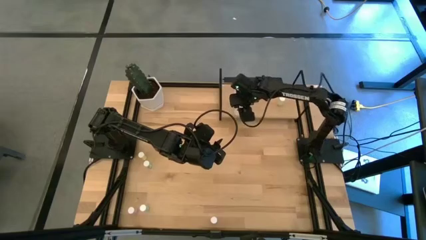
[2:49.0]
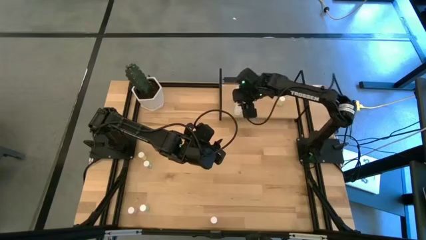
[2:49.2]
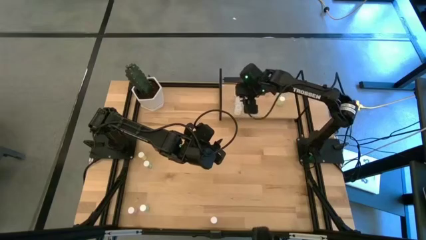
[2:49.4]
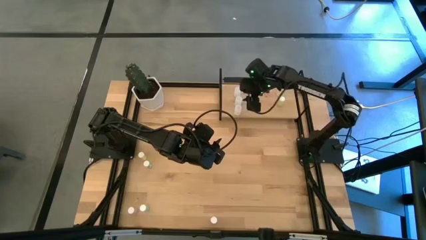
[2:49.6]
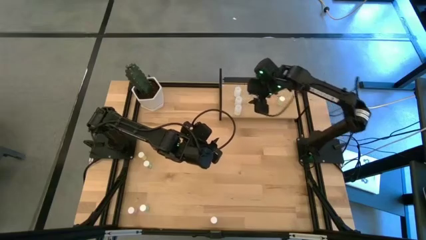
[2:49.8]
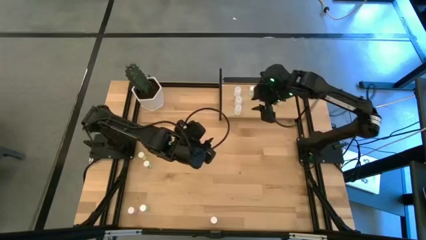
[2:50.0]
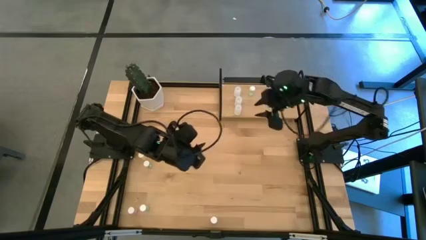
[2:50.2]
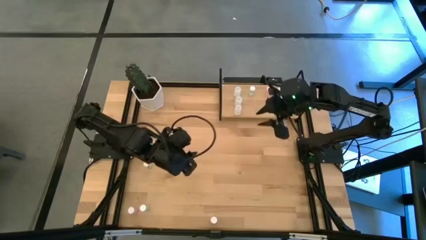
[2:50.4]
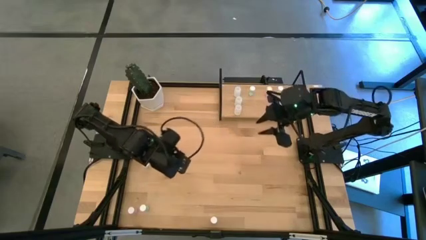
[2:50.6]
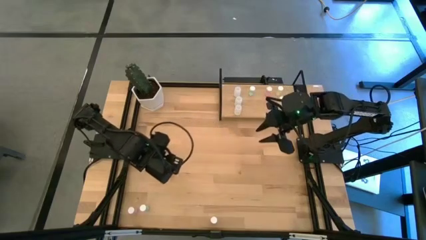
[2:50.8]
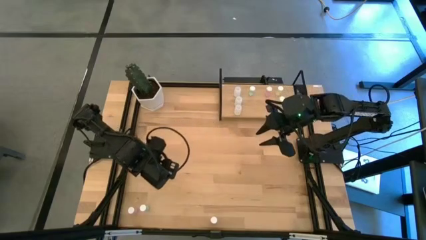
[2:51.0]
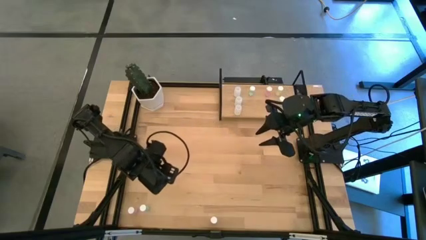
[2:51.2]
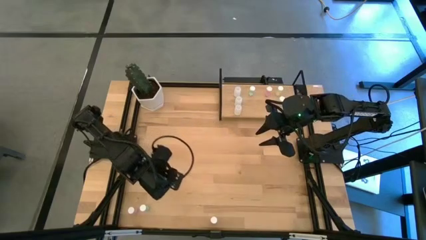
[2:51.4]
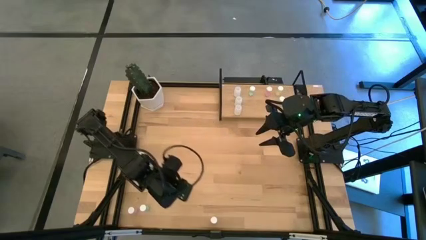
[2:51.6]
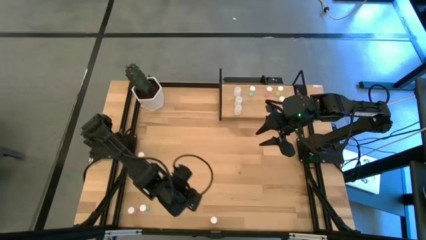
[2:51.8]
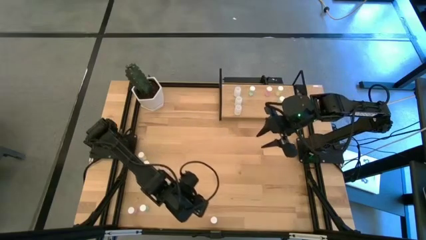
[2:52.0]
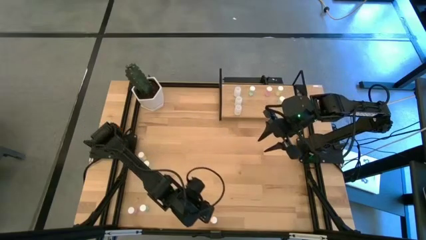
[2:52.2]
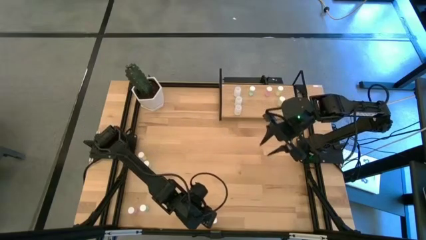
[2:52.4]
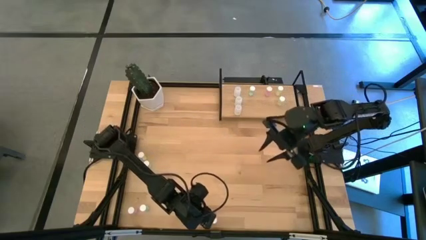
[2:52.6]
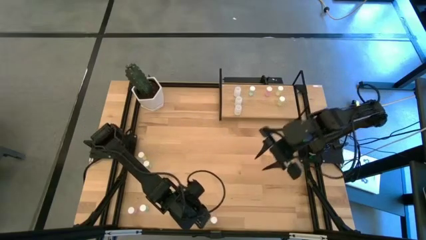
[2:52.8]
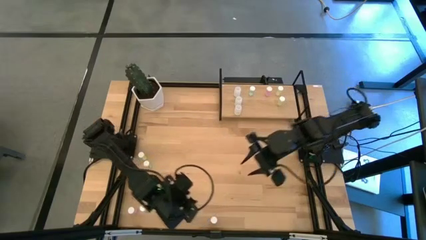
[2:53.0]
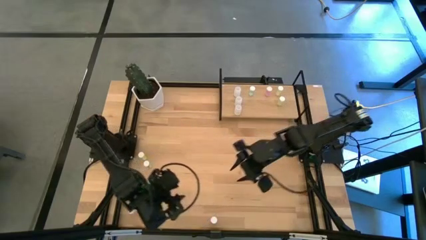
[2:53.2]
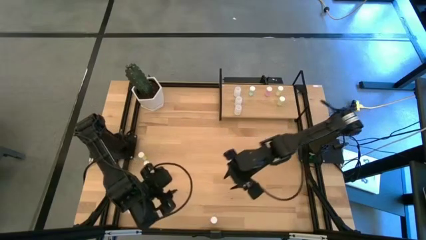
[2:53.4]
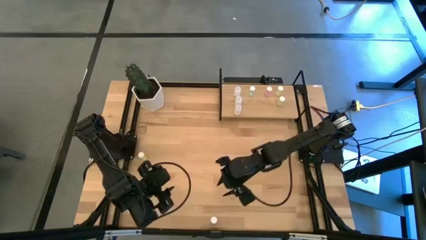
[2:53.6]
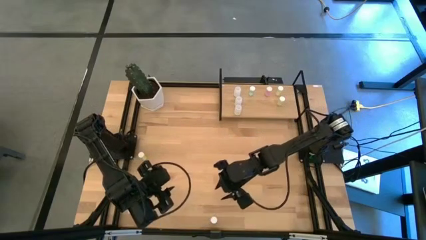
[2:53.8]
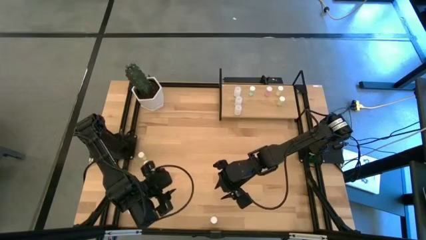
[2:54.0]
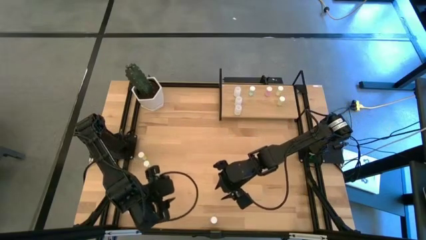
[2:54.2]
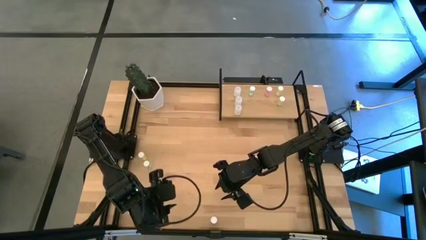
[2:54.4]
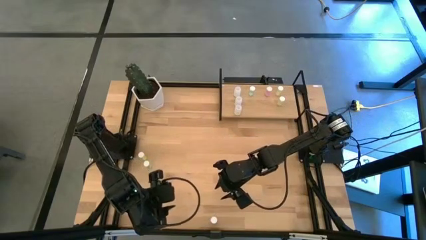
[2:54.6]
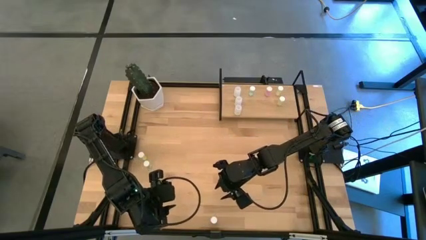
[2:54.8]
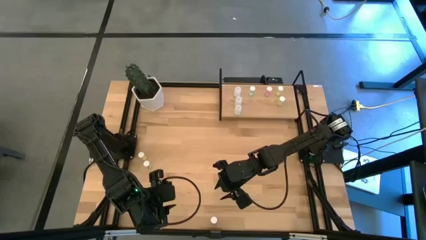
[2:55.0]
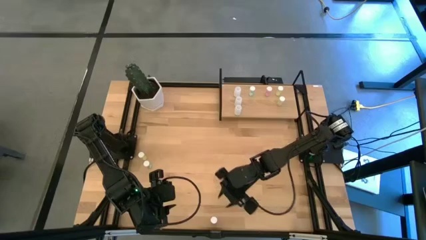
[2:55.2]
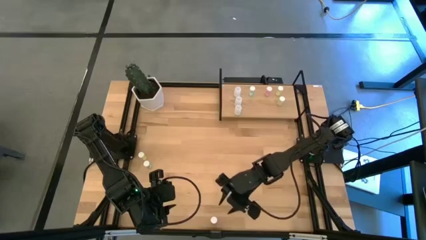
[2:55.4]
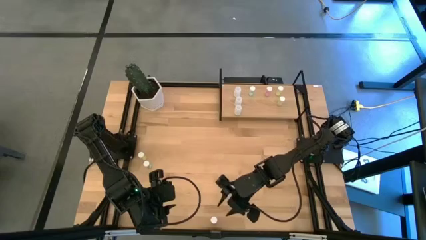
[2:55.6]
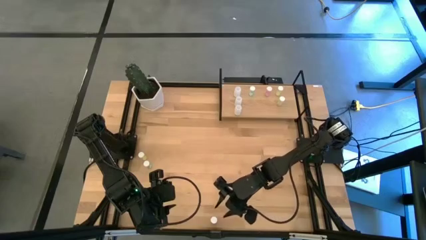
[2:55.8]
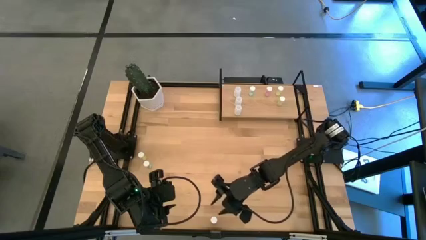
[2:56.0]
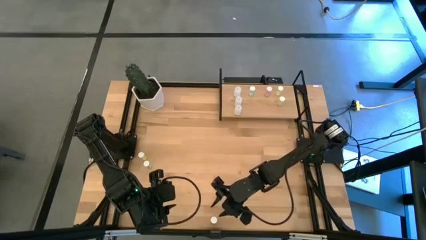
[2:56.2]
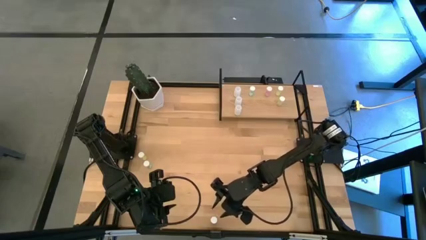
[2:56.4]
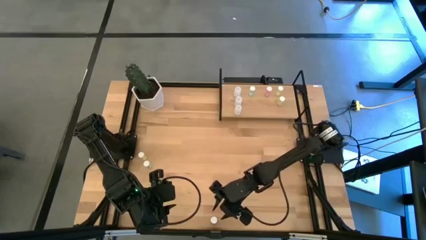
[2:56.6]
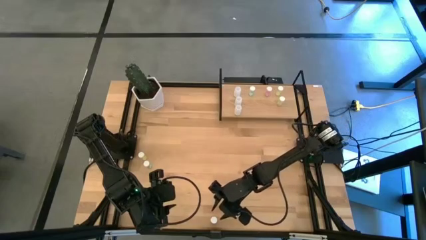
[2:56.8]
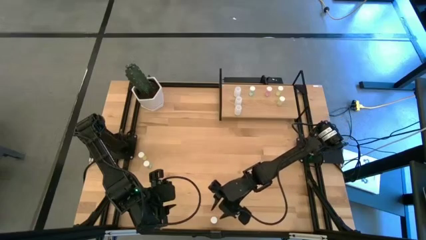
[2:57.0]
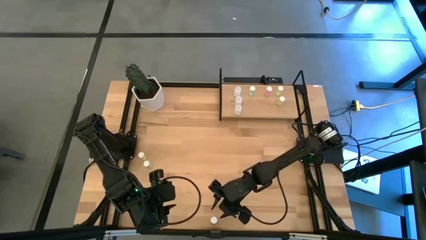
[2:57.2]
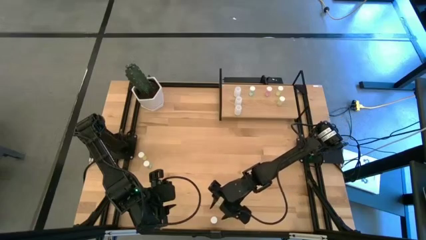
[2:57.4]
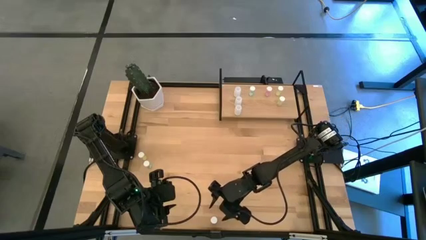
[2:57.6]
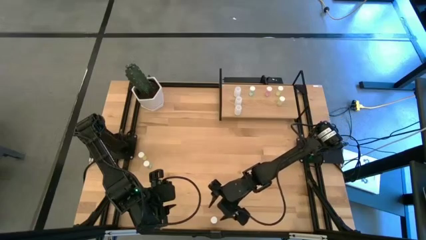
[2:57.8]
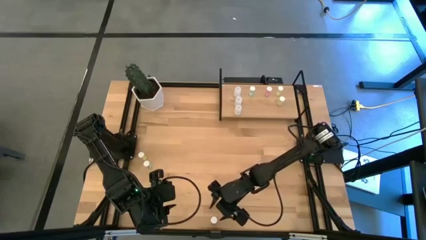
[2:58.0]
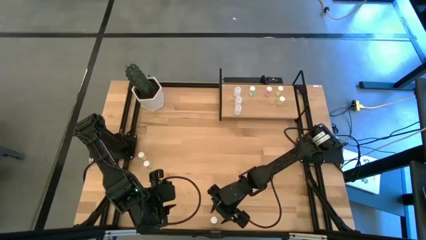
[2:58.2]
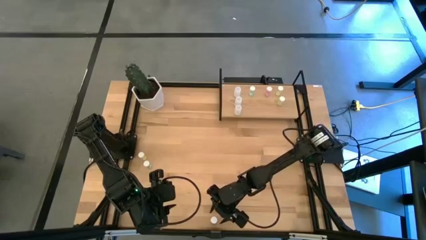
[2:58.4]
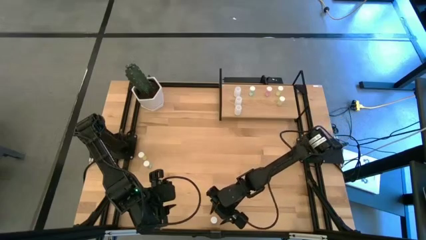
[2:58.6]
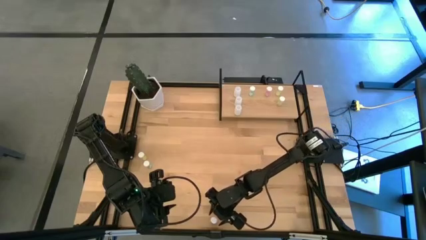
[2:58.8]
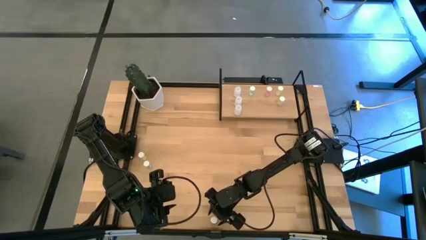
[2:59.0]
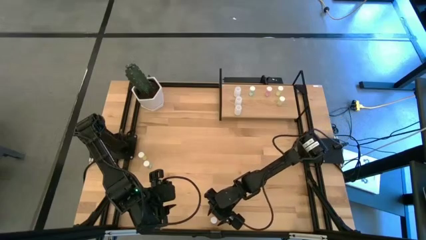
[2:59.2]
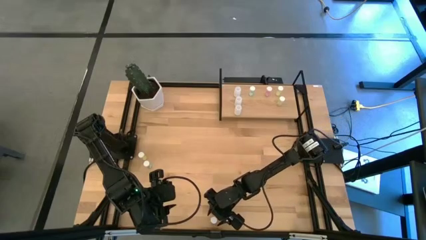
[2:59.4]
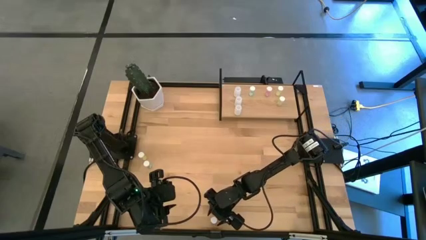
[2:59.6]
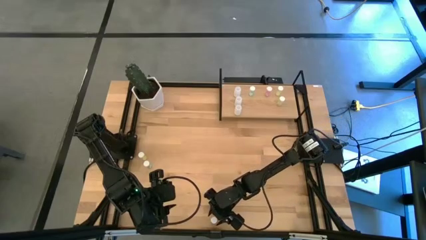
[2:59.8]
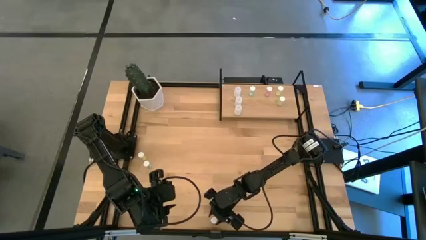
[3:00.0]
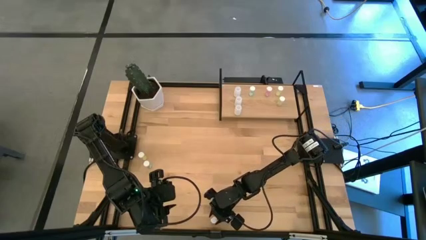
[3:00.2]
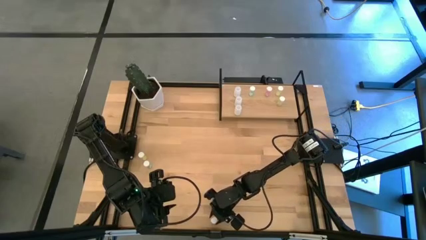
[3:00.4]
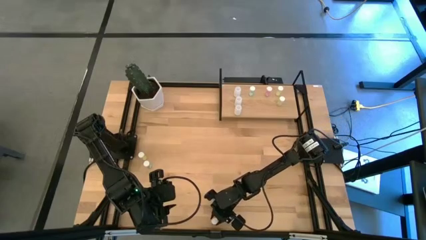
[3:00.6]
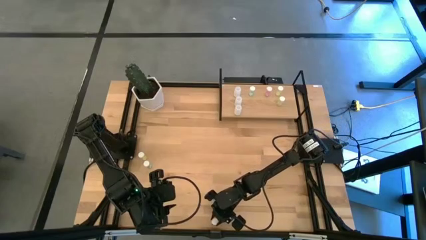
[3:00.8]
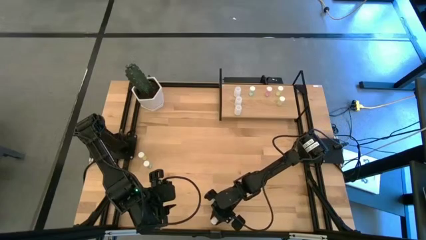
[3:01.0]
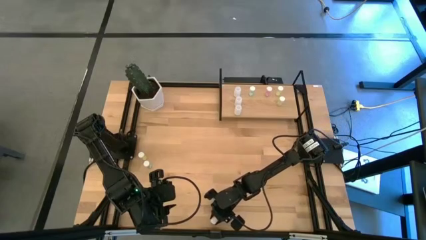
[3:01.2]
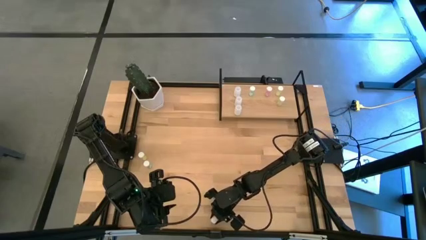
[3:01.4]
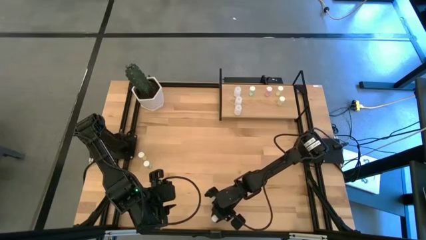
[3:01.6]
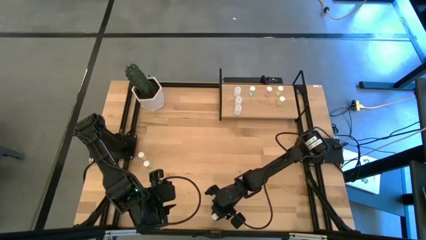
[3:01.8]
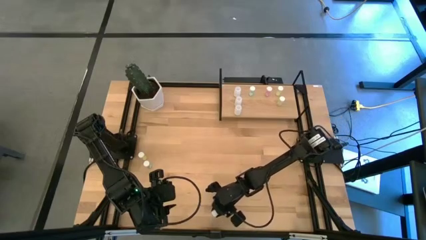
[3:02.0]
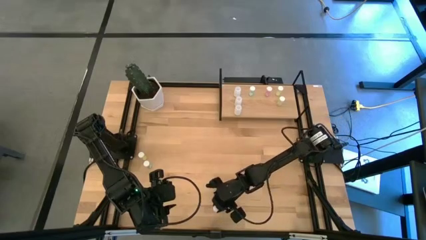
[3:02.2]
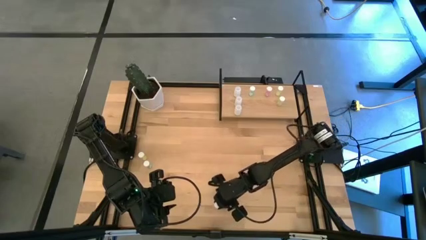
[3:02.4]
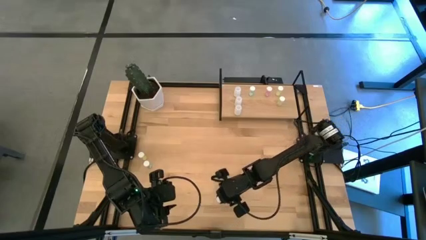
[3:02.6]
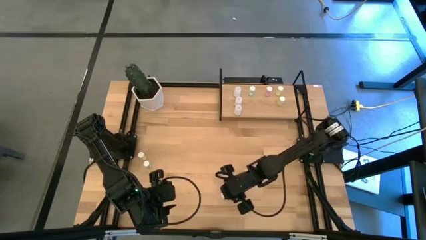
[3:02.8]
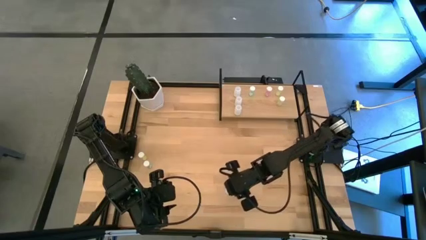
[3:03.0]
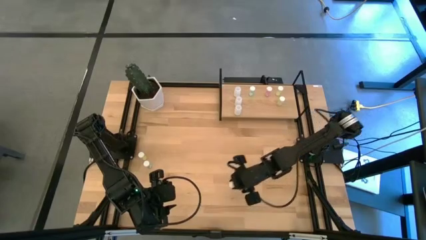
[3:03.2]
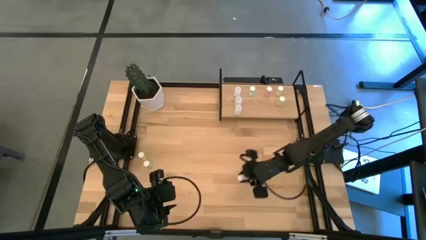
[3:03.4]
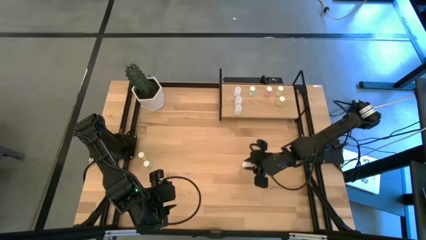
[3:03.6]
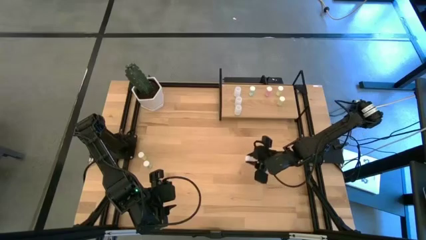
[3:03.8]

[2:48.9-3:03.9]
Task: Pick and place medicine bottles onto shelf by color
Put the right pink pill bottle on the shelf aligned with the other pink pill bottle

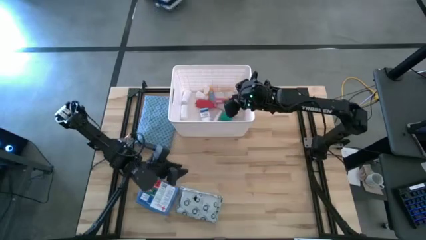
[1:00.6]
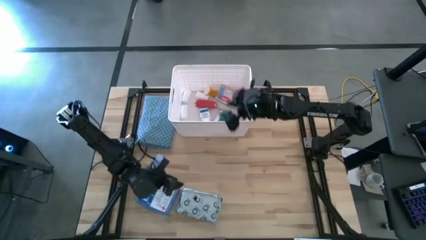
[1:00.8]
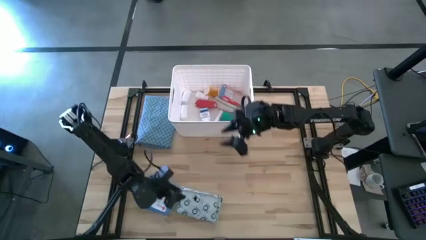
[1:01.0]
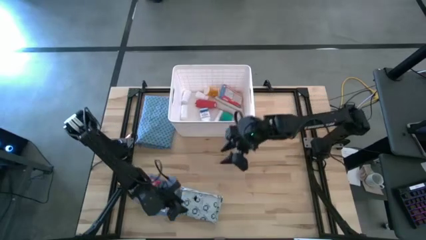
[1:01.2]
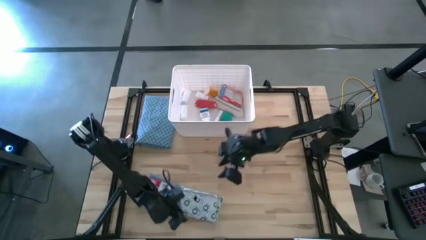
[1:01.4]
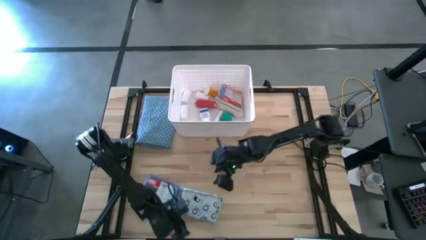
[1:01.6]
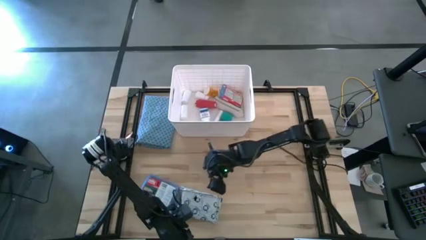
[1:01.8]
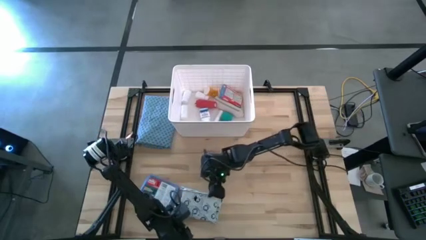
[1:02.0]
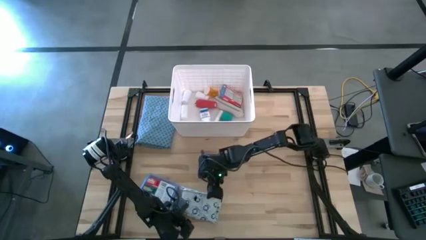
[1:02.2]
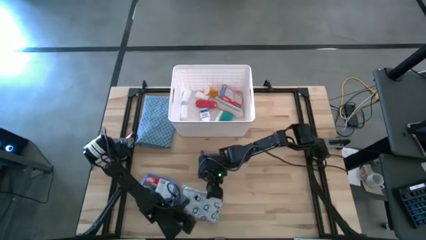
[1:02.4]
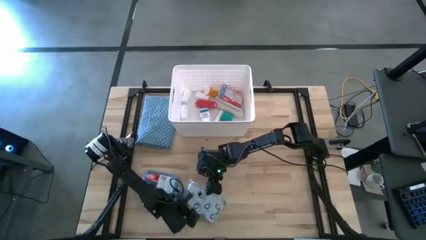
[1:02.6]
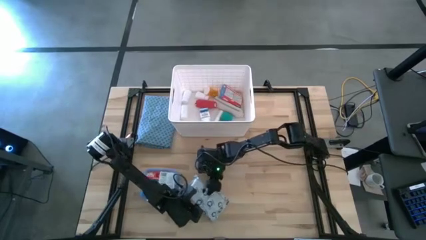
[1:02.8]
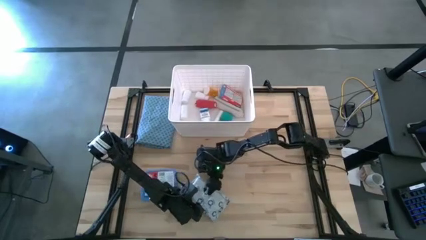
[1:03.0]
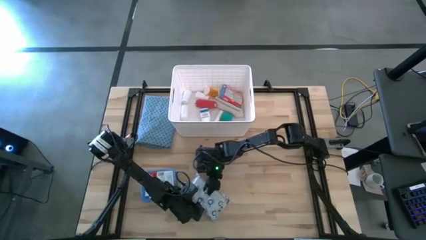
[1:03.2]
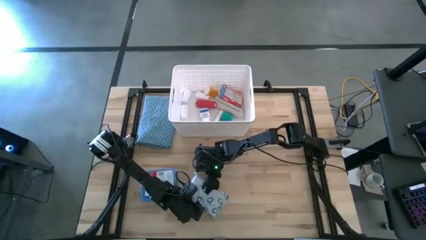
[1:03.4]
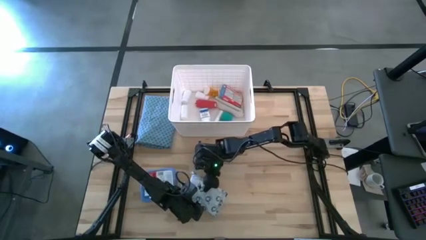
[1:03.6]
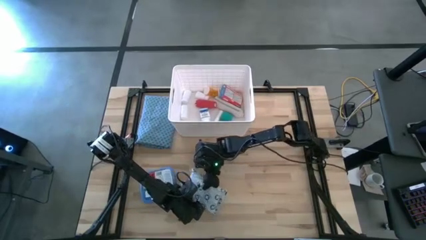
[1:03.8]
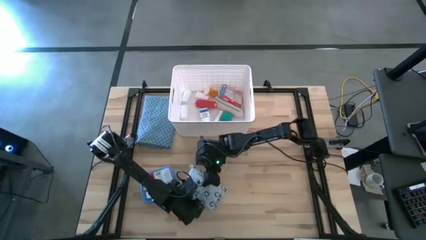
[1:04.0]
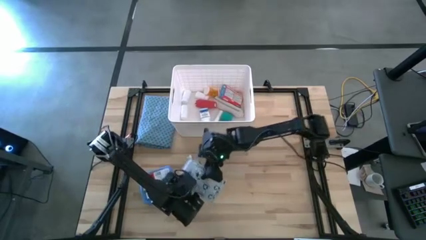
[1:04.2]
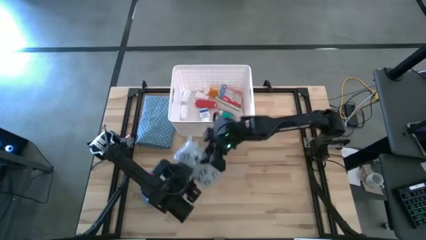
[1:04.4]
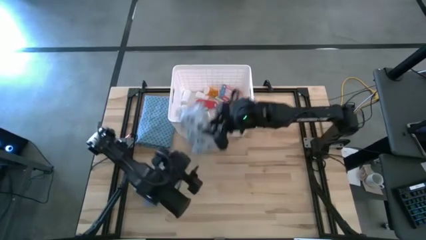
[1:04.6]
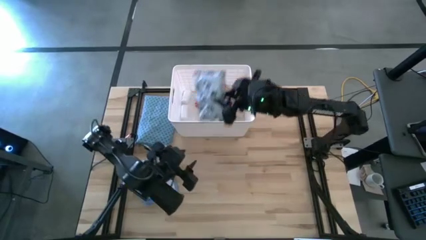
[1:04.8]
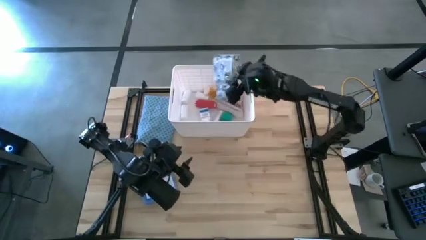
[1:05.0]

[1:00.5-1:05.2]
Task: Pick & place medical supplies in basket/bin
Put the white mailer bag in the white bin
